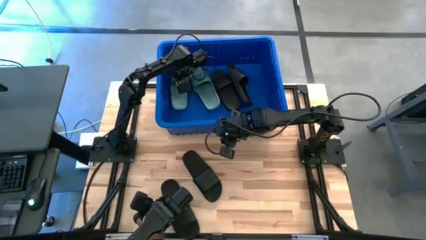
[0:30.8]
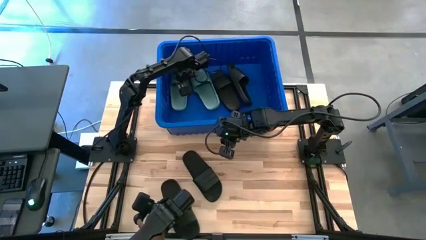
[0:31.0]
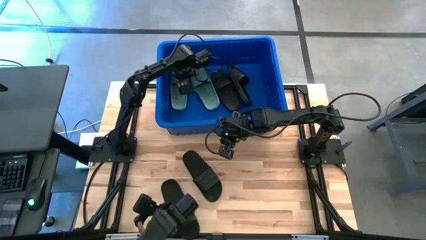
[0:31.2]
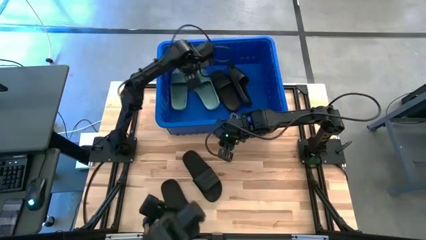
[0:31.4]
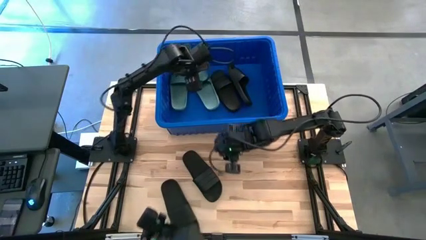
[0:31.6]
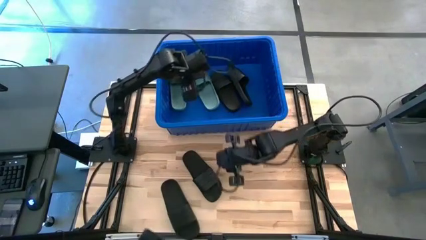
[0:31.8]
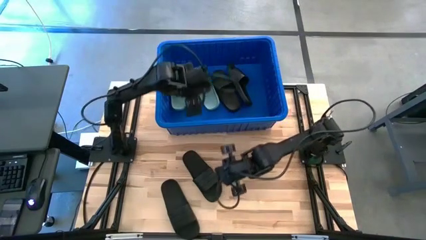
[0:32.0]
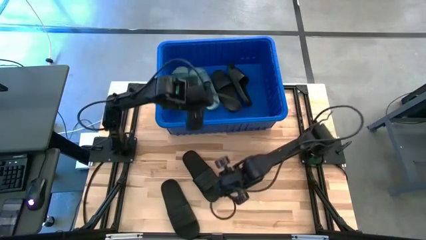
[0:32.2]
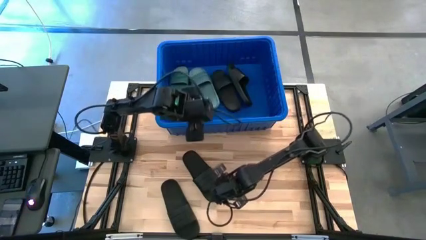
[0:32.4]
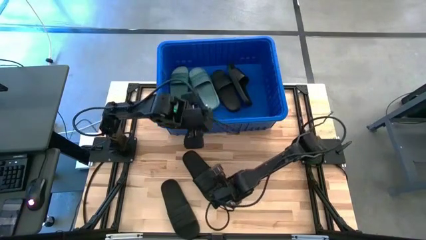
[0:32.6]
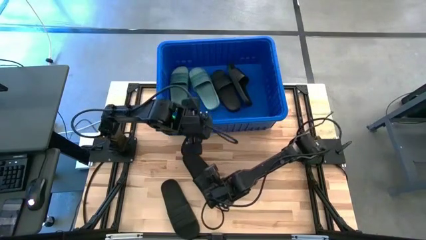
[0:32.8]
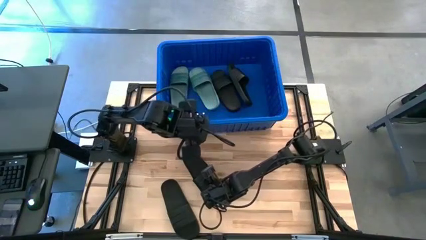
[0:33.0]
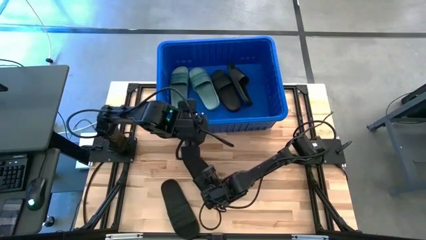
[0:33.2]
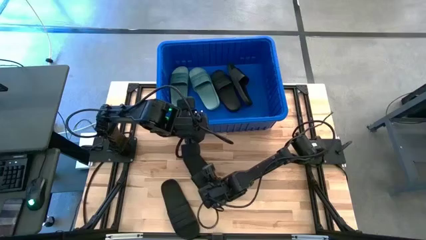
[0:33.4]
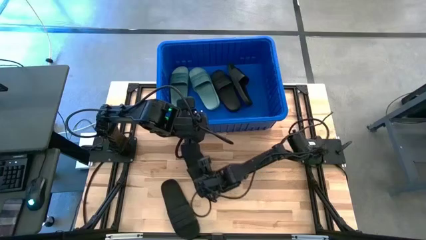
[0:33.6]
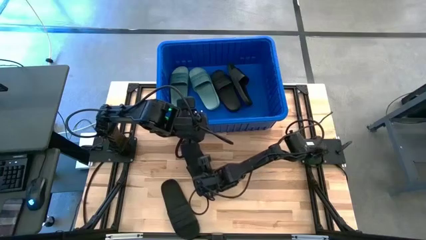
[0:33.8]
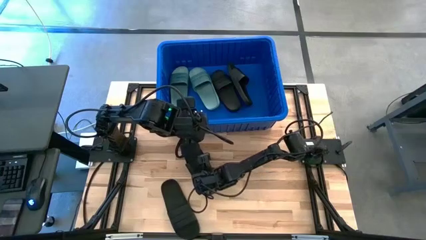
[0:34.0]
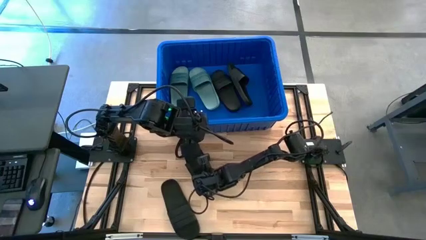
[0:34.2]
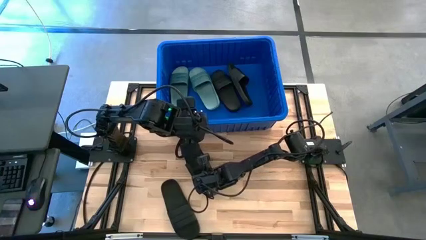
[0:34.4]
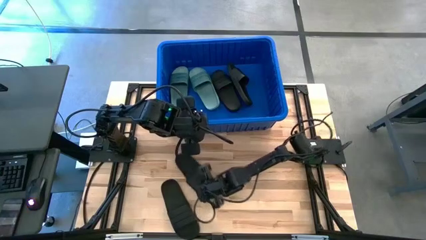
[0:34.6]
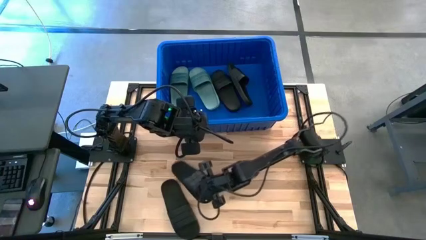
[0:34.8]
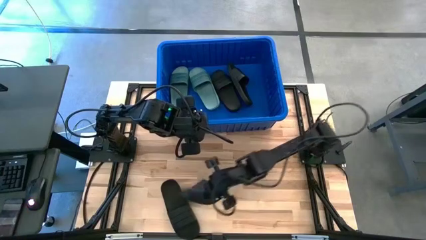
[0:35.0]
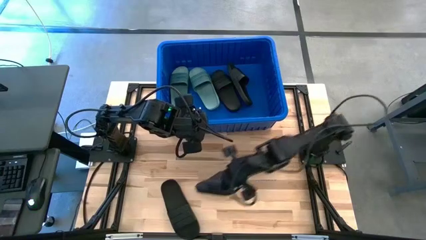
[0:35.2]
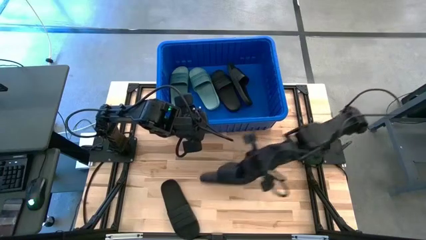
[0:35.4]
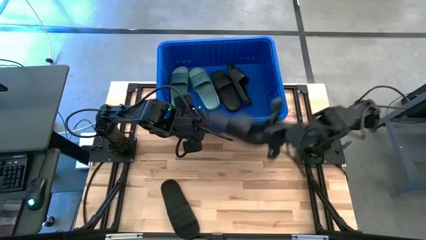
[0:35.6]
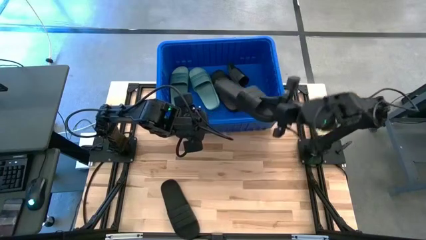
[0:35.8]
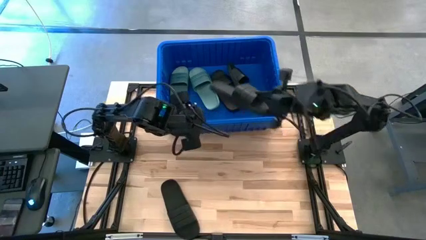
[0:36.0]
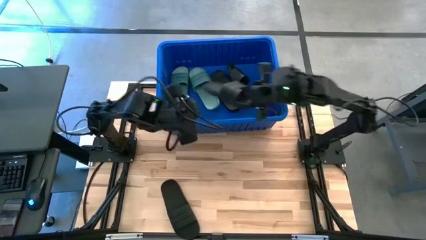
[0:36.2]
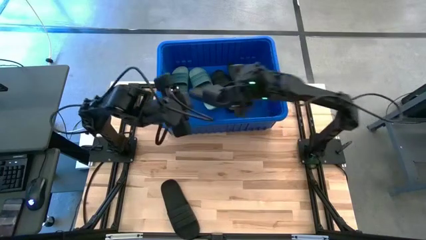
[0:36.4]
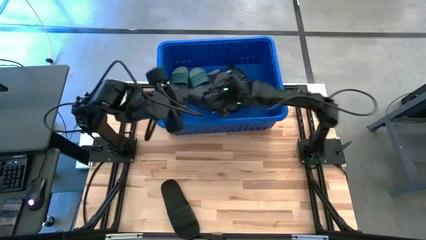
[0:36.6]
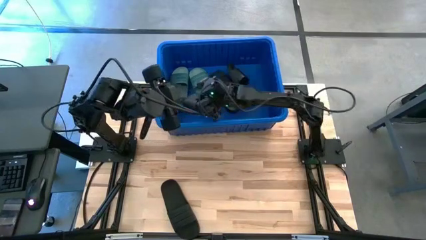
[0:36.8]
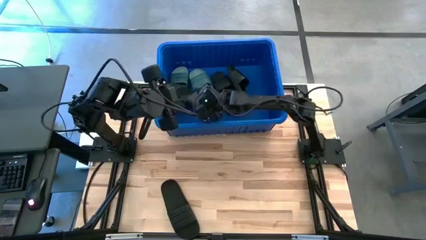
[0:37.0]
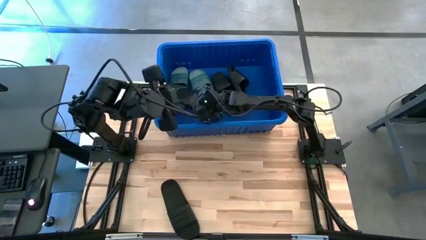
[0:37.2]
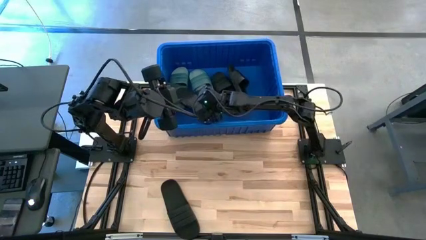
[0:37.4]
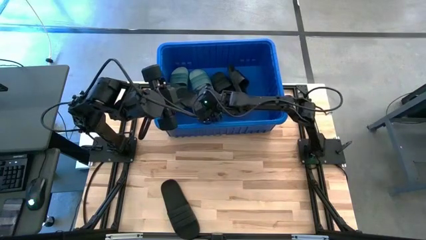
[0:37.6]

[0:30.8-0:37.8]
Task: Pick and place slides into bin
Put the black slide into the blue bin

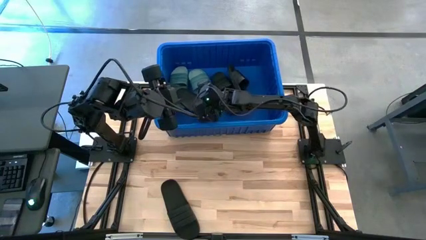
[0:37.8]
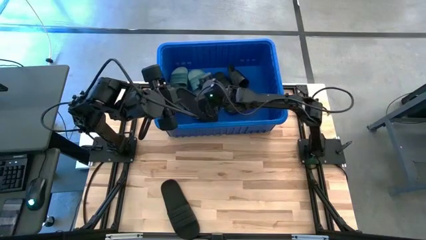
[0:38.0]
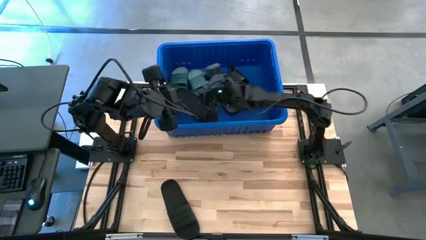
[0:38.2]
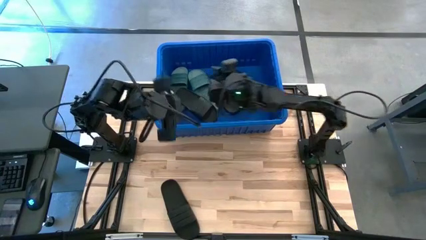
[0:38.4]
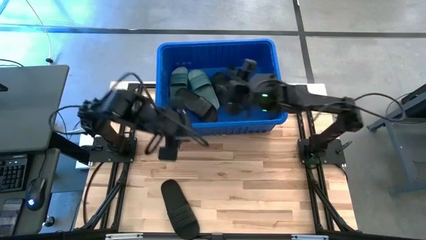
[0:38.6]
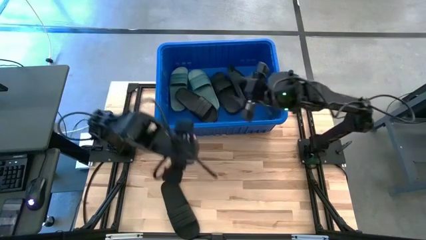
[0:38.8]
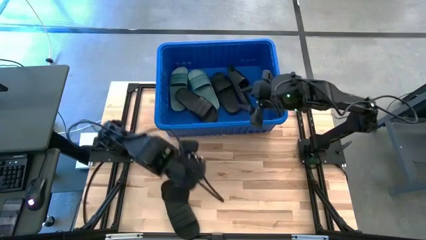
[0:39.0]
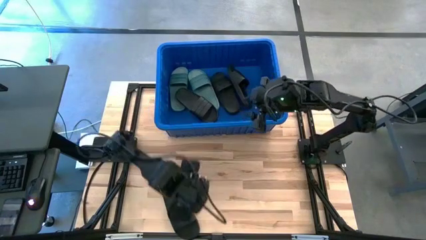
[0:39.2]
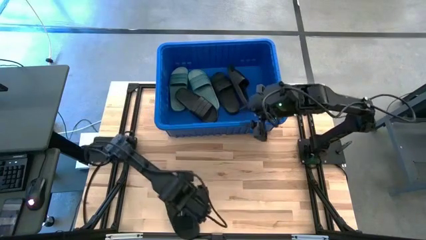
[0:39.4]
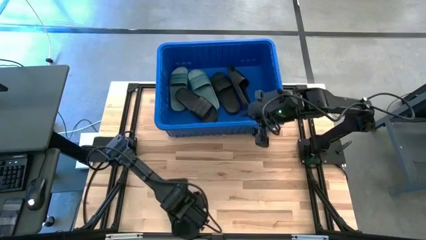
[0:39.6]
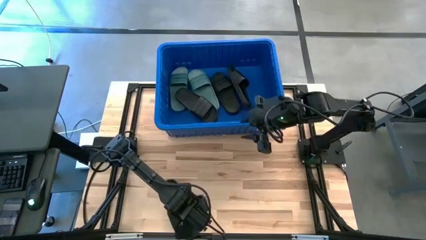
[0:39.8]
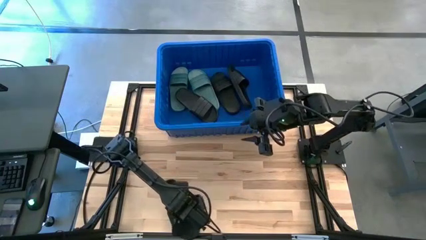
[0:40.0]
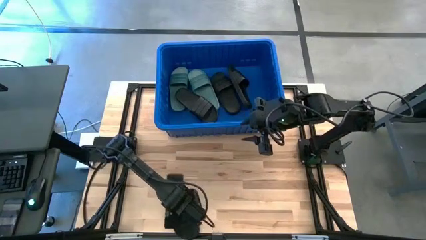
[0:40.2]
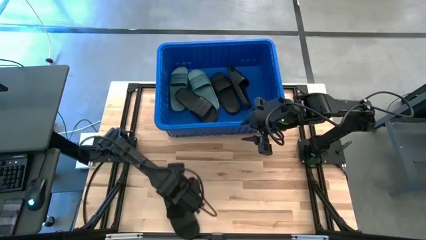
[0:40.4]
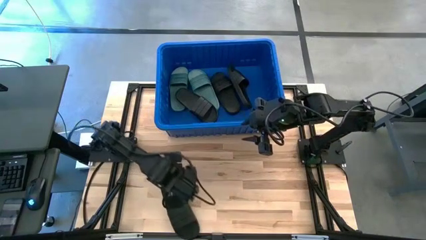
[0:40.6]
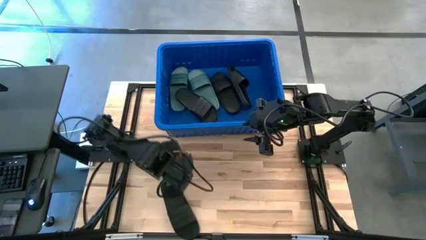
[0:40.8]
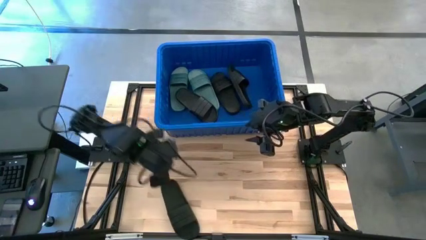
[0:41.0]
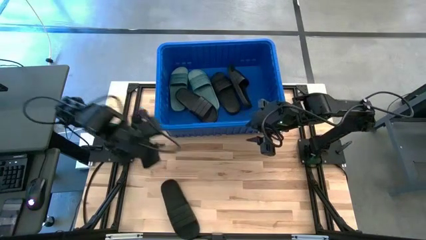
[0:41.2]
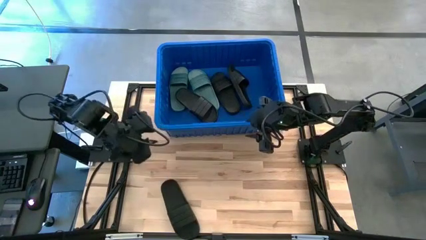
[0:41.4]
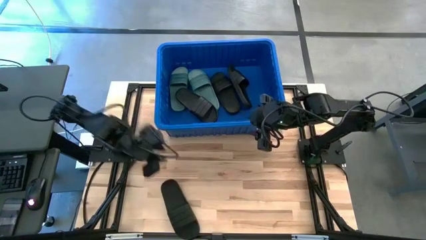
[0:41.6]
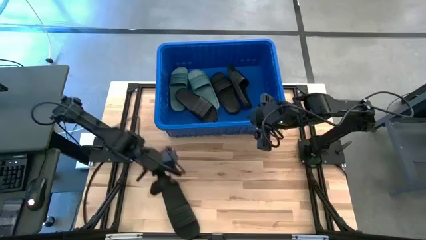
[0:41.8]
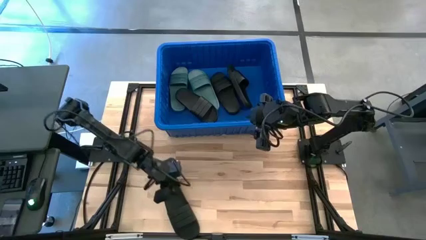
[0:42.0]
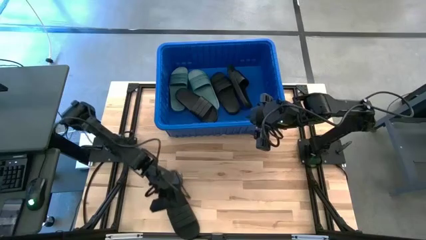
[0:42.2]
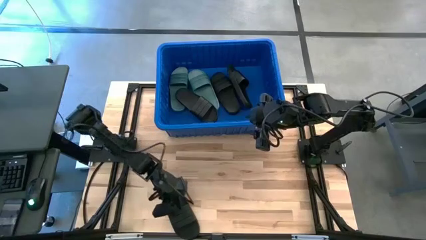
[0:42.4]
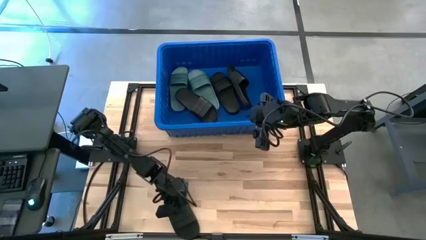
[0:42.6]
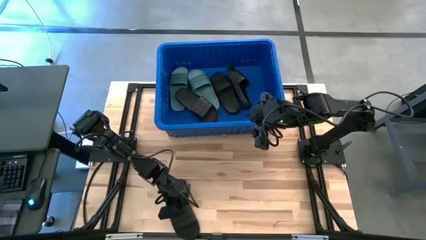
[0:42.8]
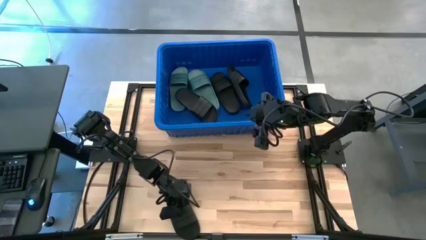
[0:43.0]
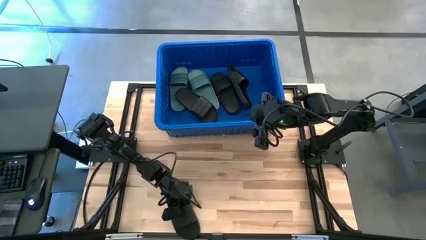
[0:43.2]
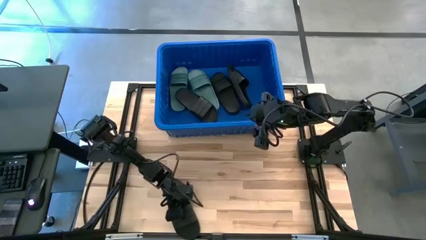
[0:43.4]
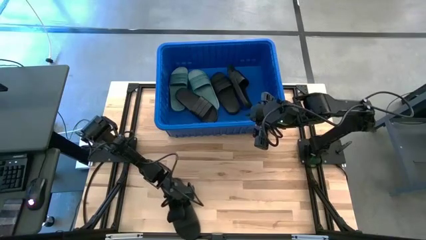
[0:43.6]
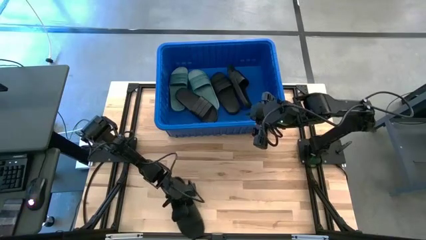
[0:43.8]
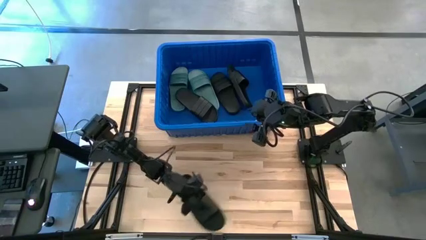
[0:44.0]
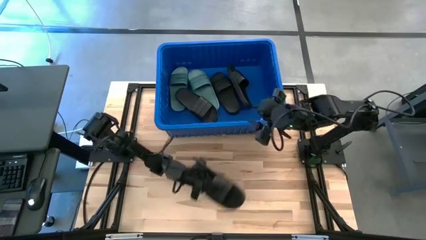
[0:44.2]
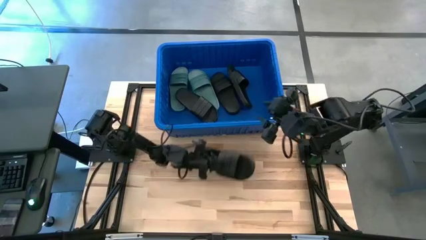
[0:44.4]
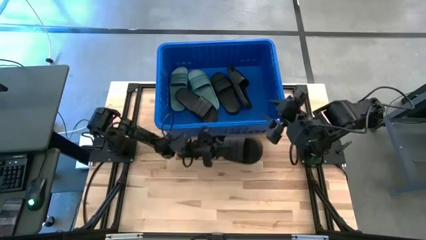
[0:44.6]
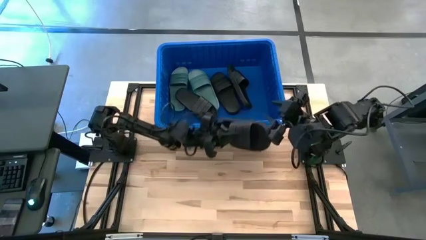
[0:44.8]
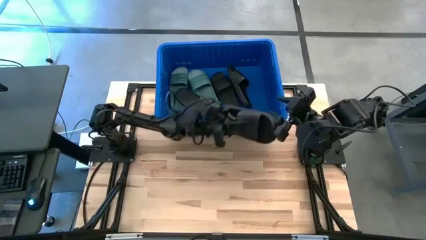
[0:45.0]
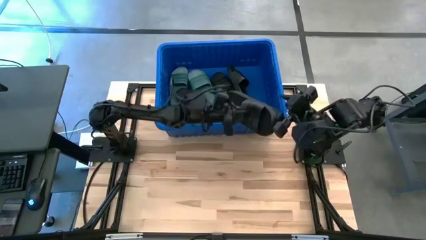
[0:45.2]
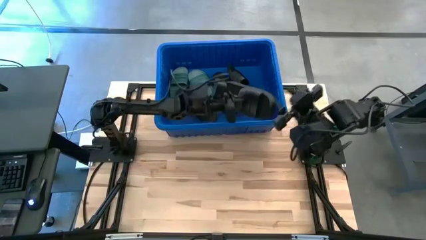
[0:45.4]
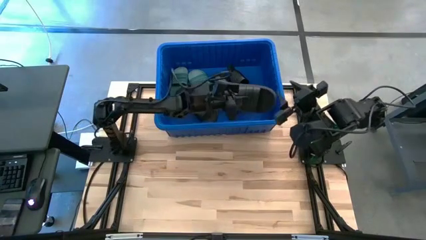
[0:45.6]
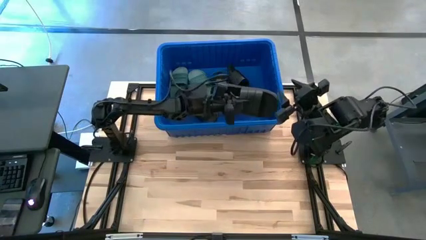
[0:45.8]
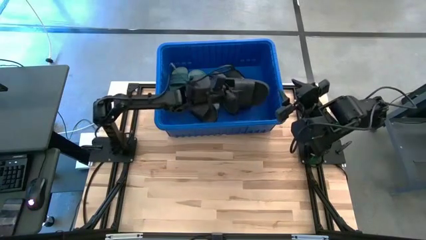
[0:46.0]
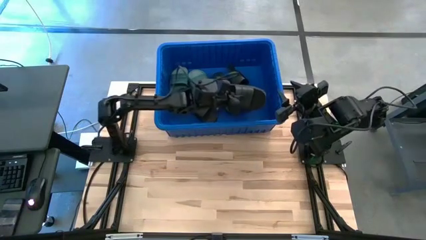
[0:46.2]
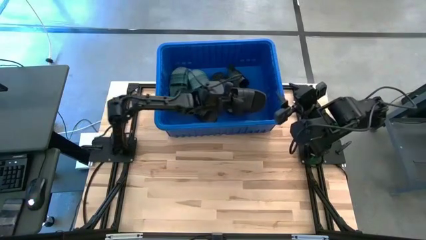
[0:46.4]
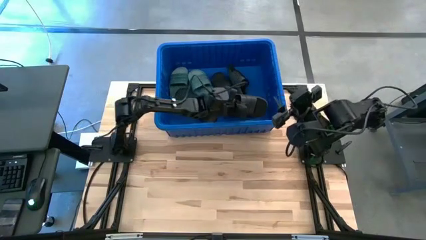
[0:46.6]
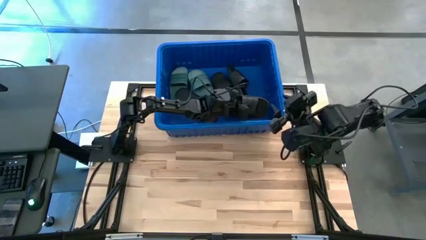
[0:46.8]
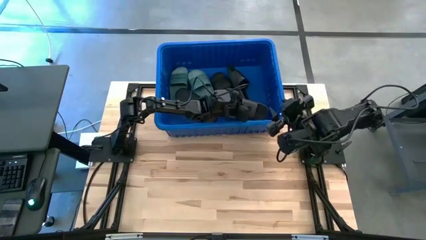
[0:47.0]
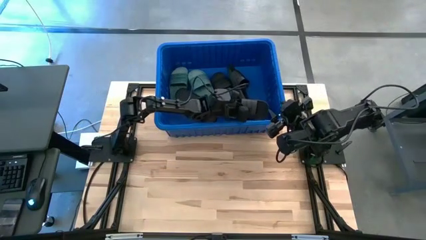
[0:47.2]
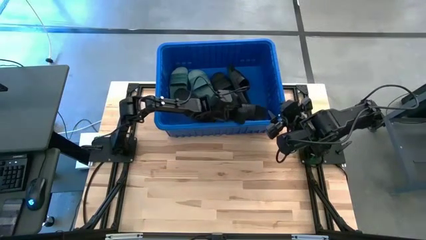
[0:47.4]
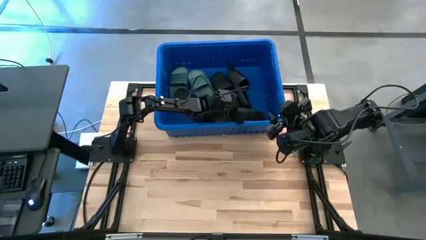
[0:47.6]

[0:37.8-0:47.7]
Put the black slide into the blue bin
